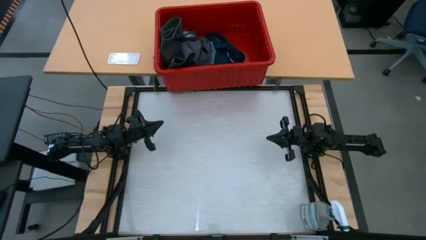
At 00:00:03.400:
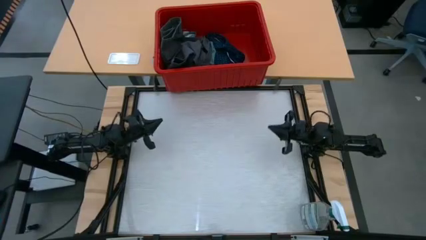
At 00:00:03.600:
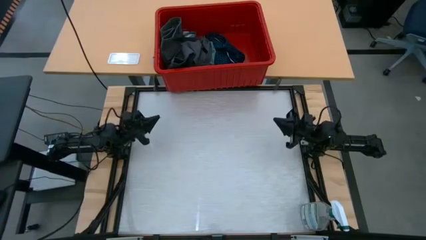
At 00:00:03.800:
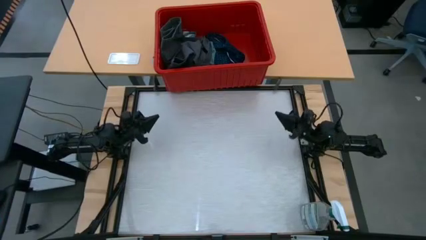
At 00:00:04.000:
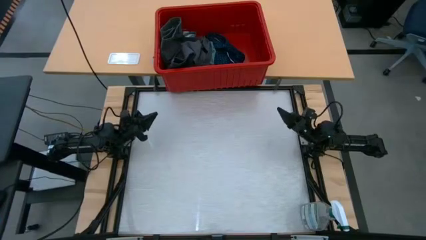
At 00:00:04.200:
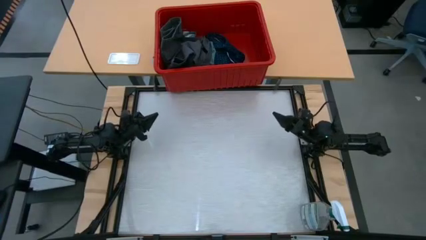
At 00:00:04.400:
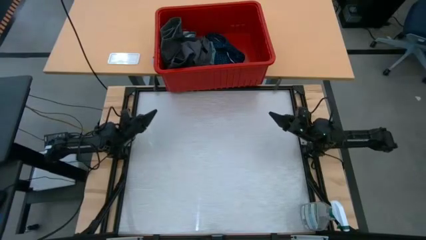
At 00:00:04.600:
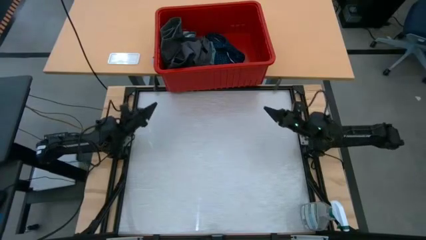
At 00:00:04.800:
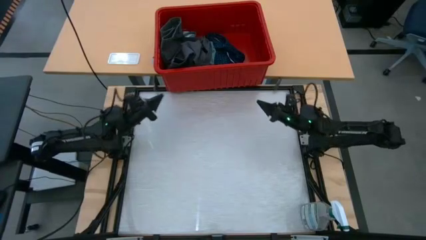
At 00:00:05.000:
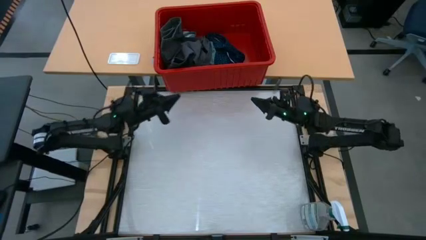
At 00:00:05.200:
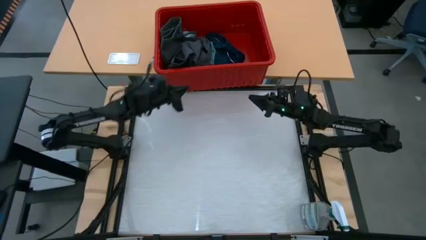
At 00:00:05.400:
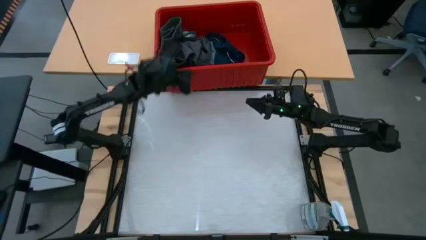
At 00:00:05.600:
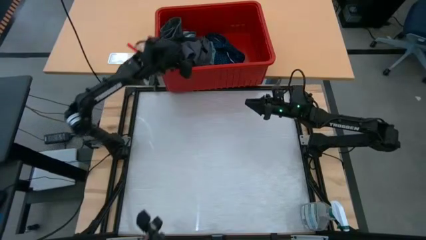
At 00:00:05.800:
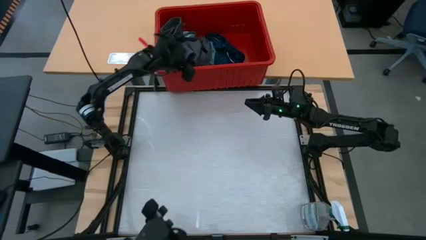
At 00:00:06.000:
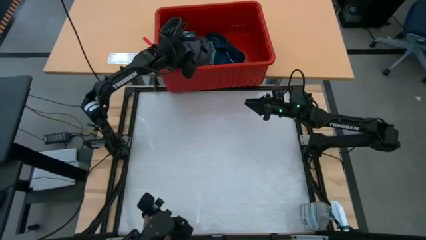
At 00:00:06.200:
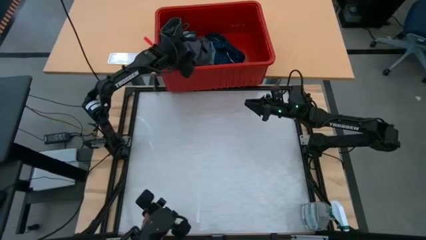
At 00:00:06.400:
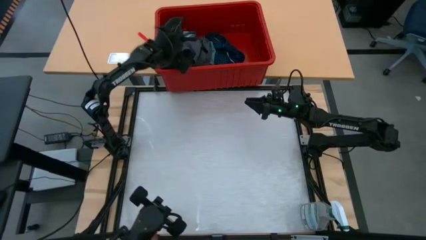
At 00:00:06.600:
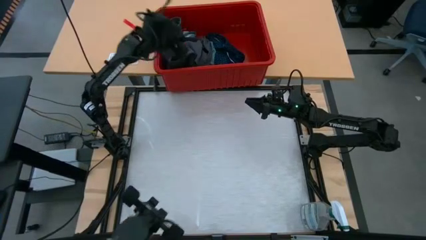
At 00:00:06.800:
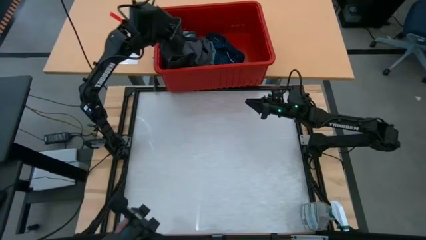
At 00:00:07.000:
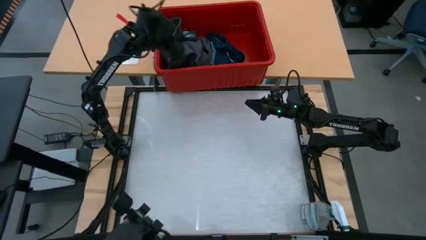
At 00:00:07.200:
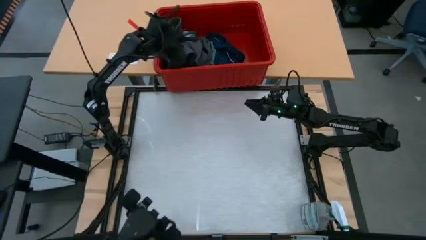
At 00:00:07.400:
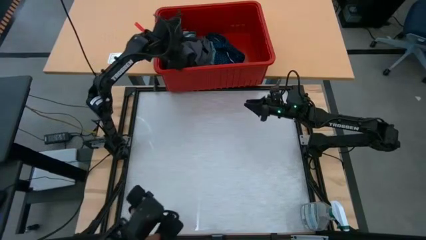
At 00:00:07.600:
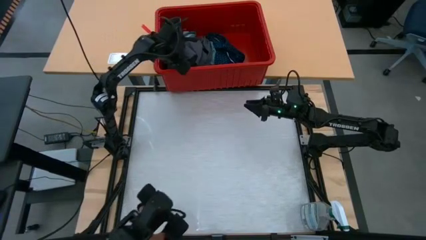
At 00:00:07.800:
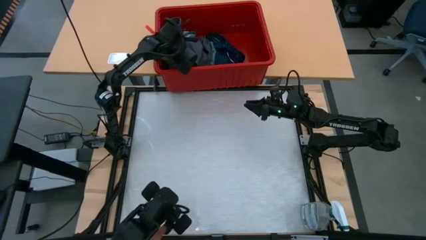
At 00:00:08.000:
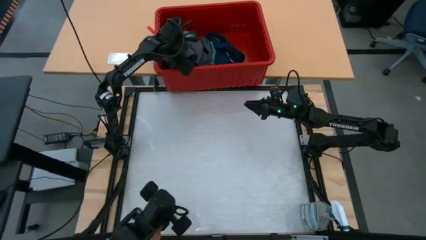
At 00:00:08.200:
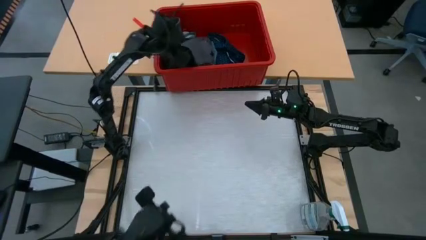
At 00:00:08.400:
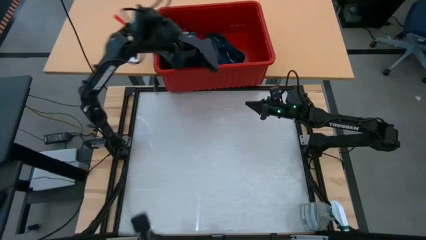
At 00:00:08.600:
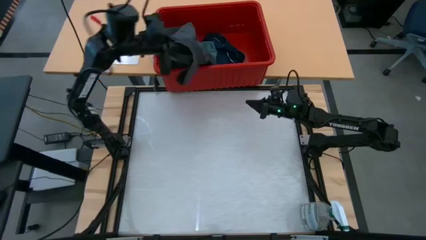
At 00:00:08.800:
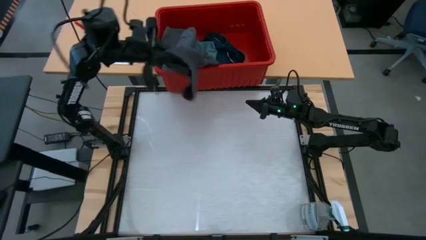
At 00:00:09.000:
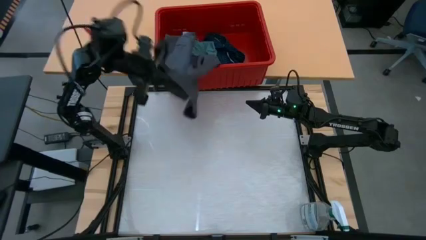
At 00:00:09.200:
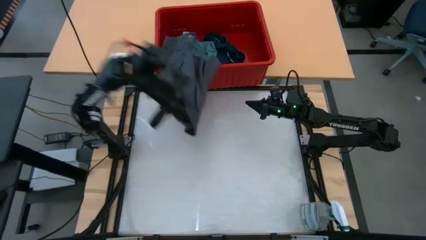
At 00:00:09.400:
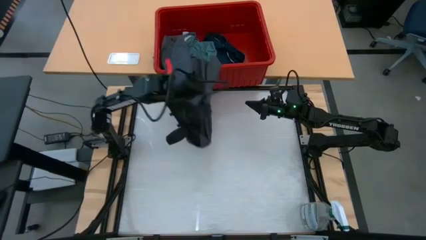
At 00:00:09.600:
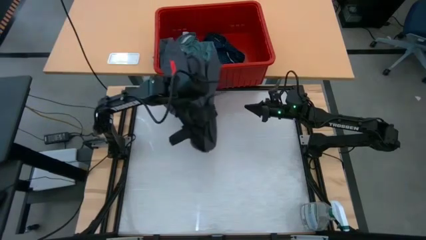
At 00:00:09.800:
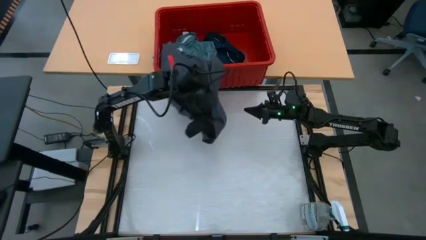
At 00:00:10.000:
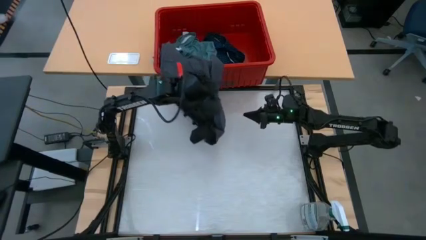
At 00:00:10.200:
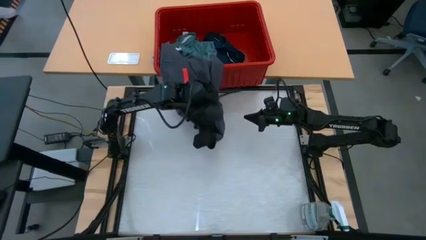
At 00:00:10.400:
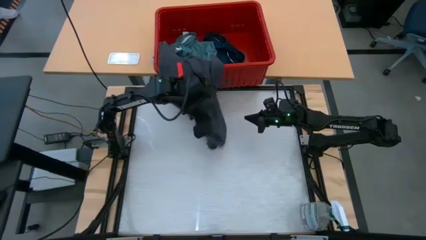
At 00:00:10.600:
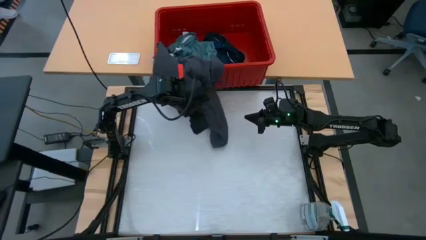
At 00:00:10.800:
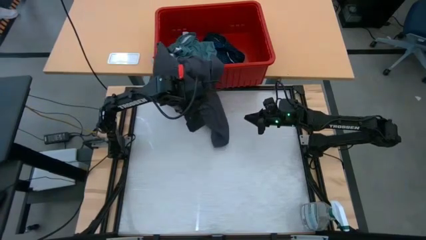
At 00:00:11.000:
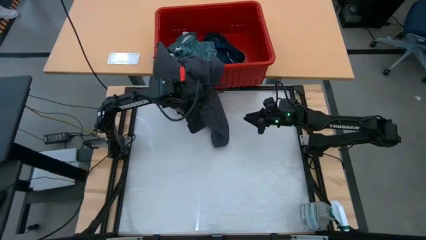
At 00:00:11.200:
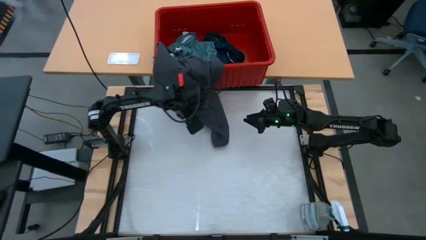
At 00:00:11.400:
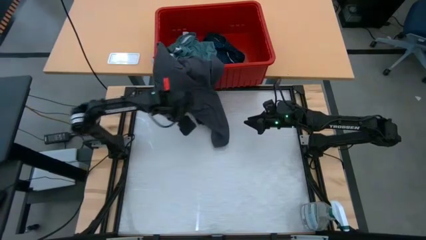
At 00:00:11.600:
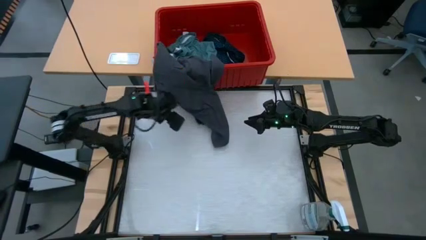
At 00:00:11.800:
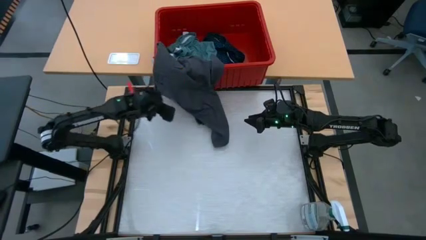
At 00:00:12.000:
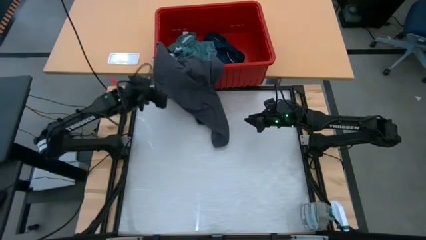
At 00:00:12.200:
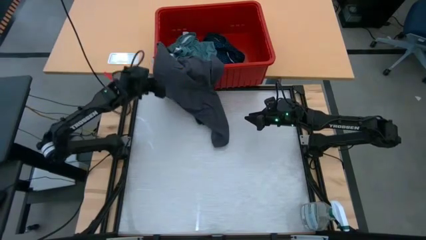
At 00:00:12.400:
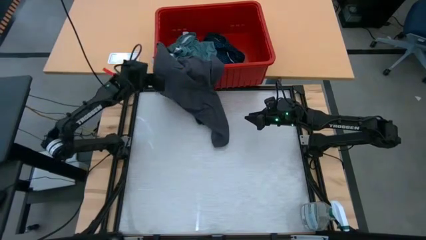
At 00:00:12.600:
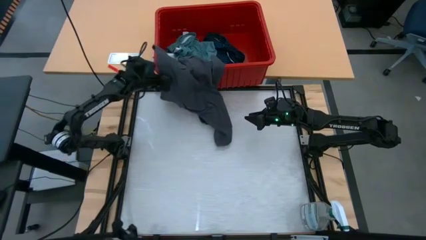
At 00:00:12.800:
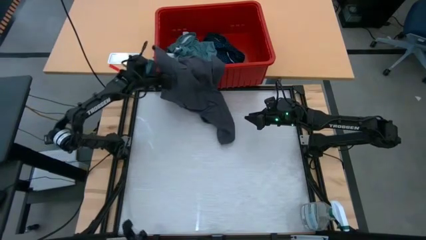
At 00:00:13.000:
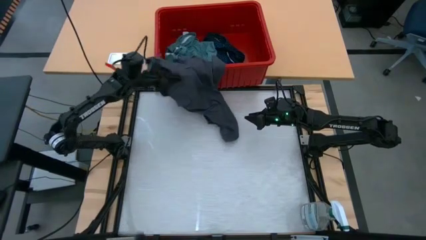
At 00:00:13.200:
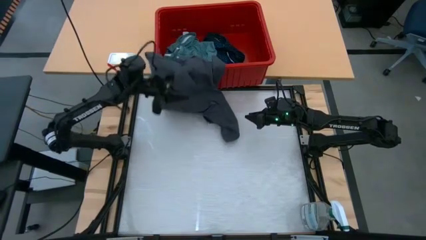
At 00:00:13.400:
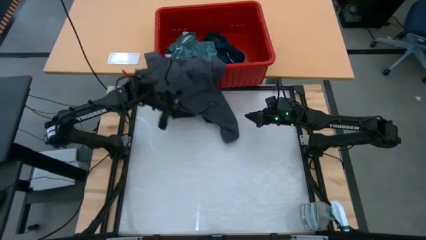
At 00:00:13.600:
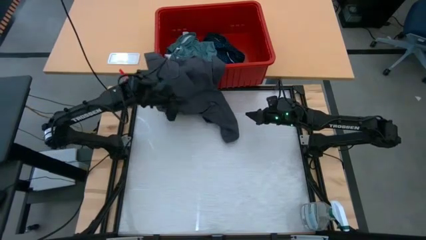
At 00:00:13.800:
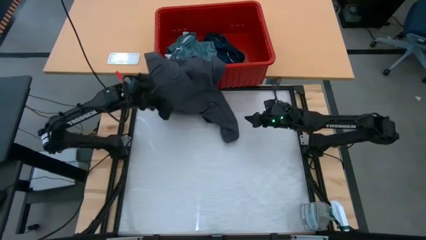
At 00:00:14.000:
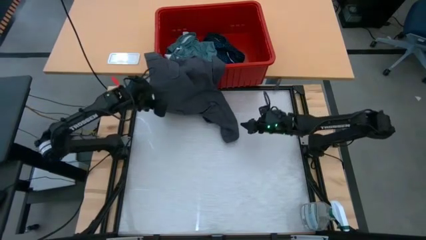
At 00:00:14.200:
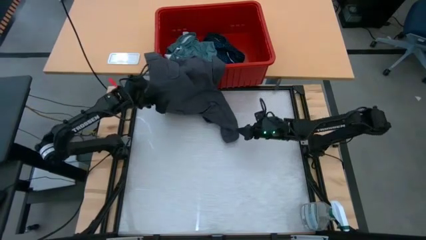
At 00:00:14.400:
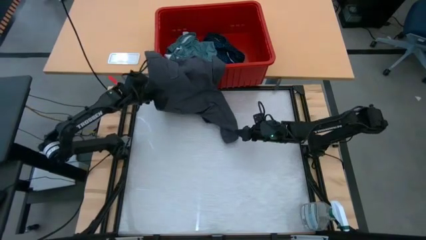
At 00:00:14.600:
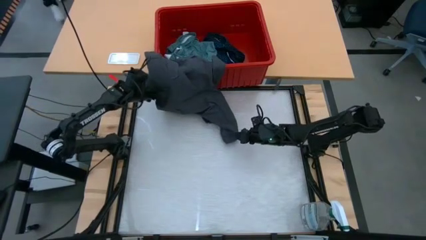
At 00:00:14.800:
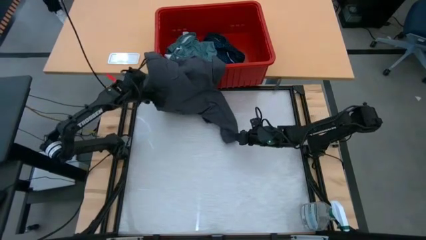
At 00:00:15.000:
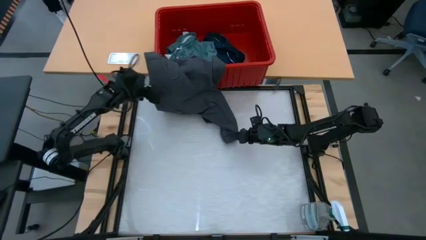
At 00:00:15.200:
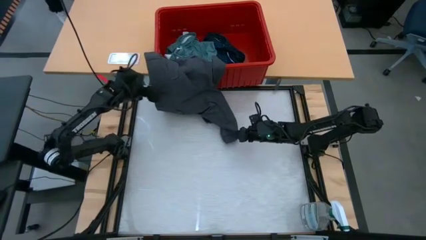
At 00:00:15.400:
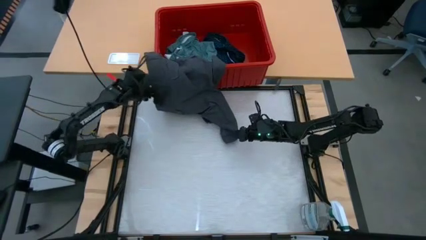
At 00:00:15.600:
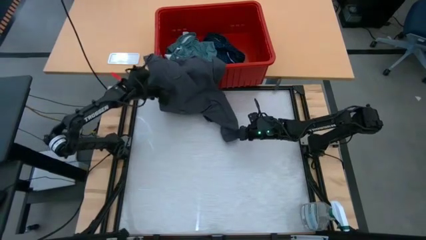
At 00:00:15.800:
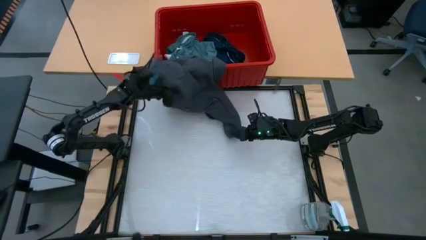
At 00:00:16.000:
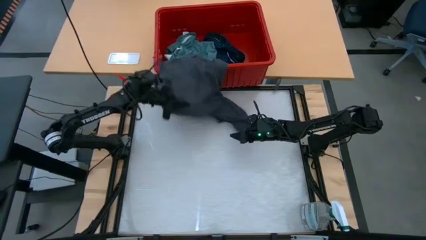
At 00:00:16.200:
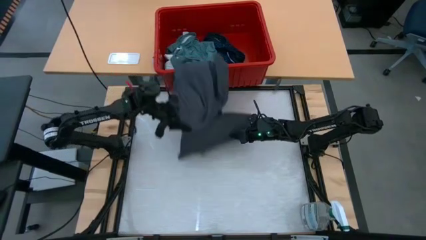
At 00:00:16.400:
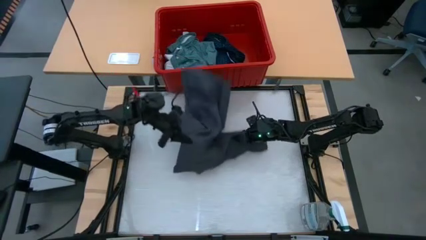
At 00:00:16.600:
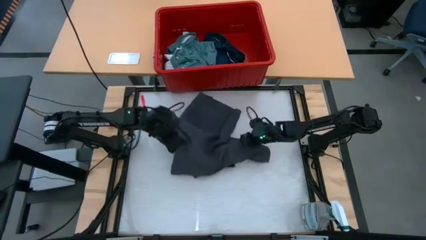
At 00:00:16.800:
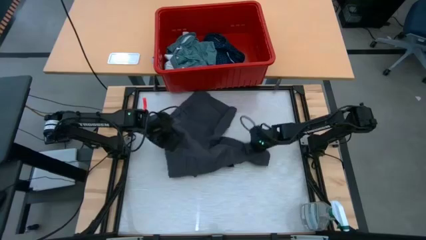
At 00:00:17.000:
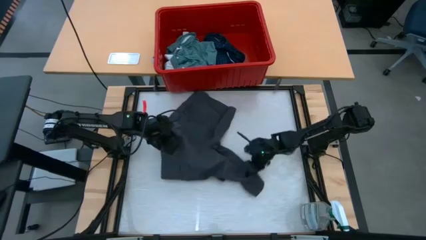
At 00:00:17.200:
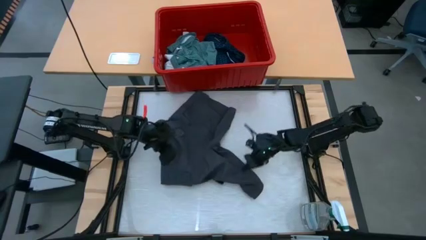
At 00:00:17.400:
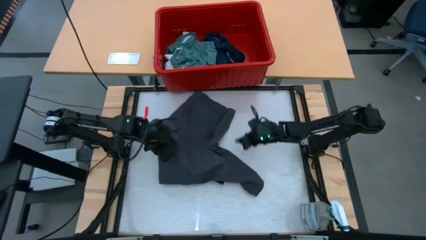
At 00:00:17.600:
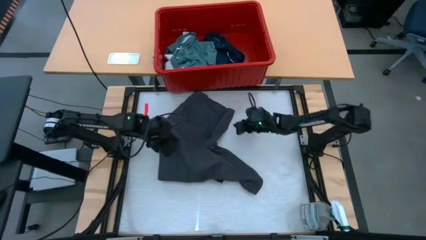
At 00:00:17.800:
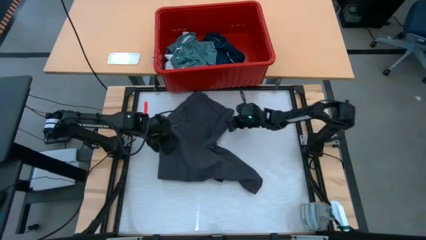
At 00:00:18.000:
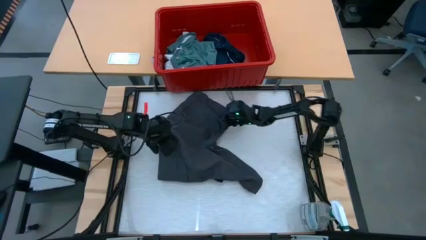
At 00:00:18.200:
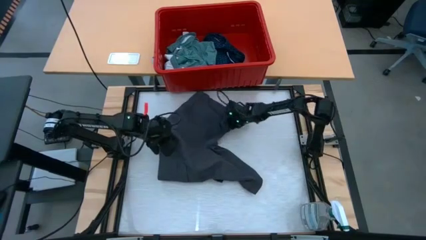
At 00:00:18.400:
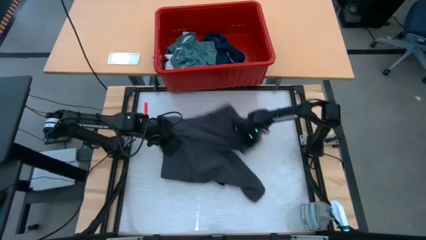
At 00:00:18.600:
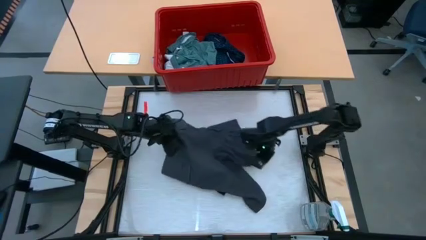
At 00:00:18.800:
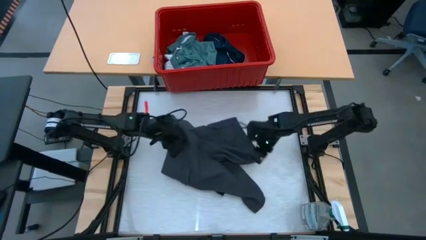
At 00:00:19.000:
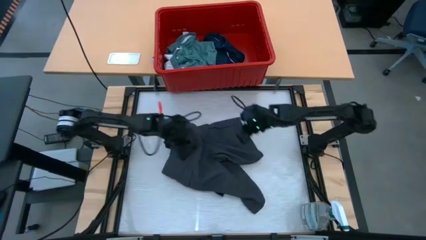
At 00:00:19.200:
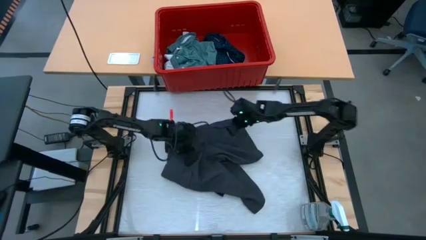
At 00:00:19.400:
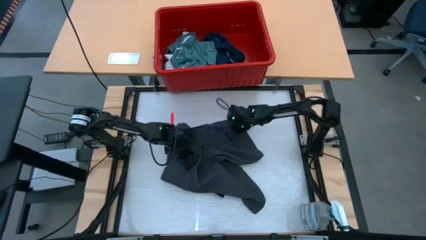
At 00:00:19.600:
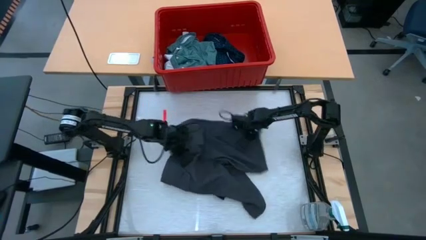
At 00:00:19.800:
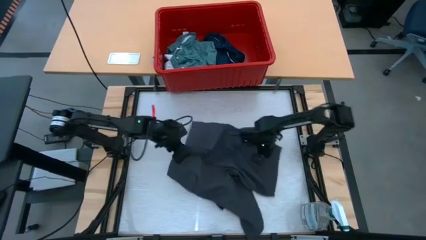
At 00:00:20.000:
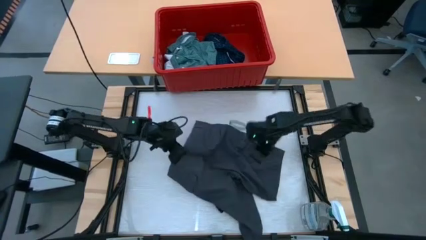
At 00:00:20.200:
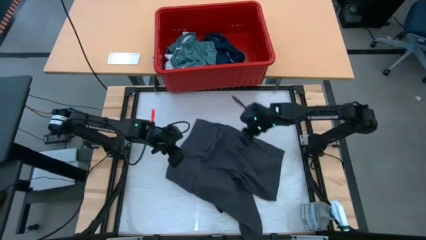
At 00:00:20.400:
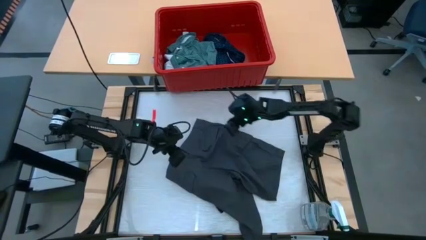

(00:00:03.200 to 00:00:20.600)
Task: Fold laundry
Remove the black pants from the red bin
